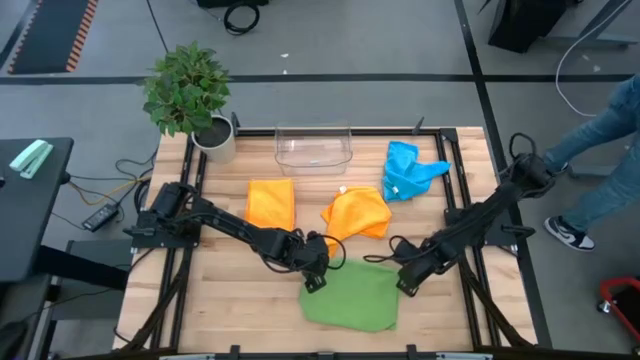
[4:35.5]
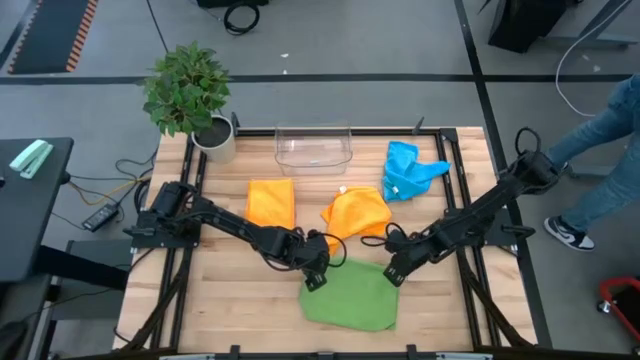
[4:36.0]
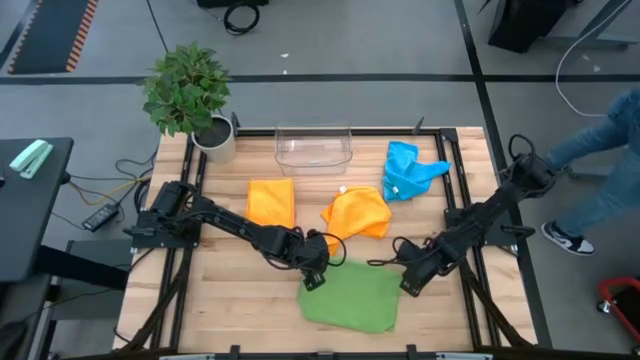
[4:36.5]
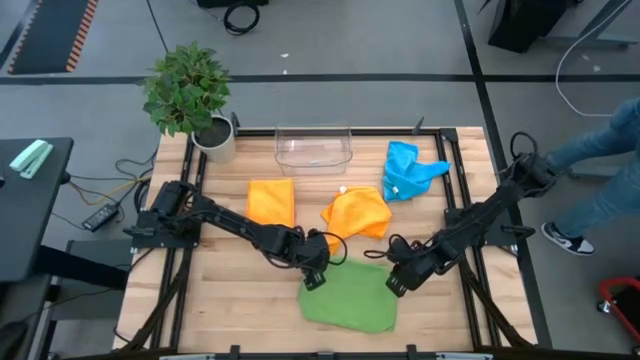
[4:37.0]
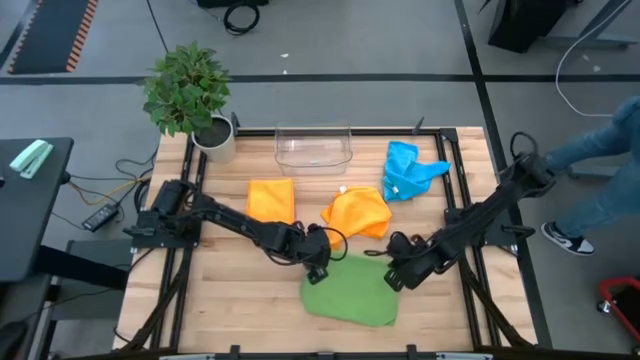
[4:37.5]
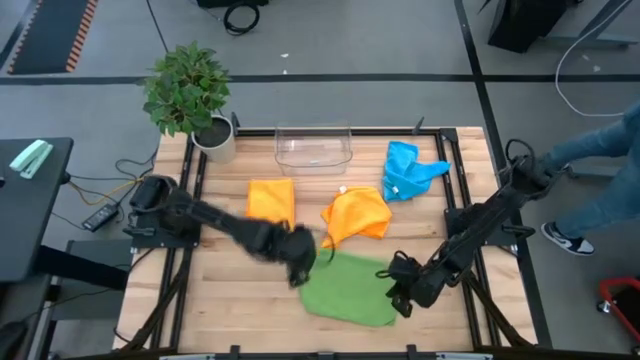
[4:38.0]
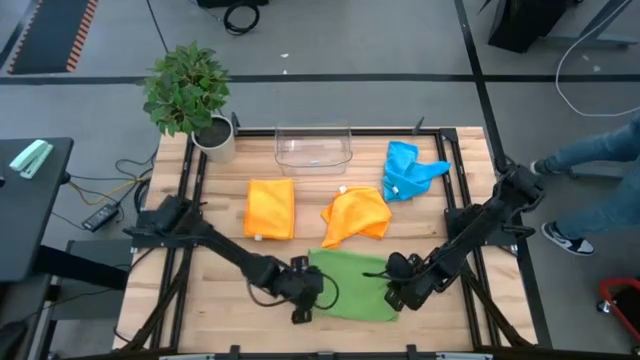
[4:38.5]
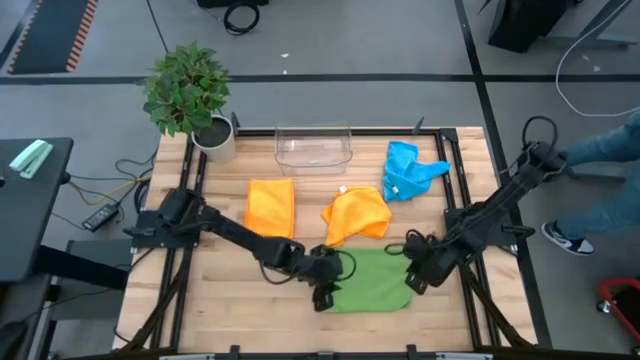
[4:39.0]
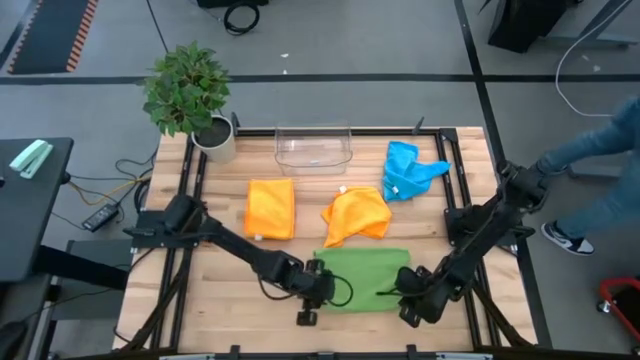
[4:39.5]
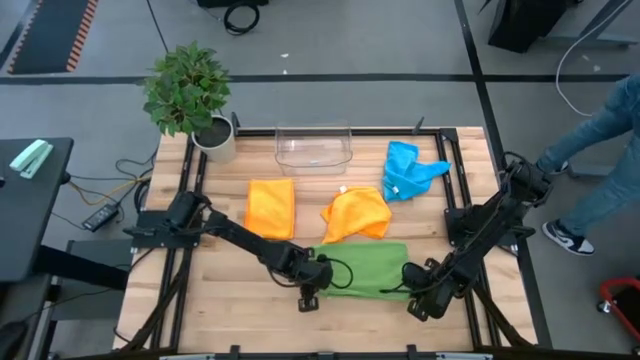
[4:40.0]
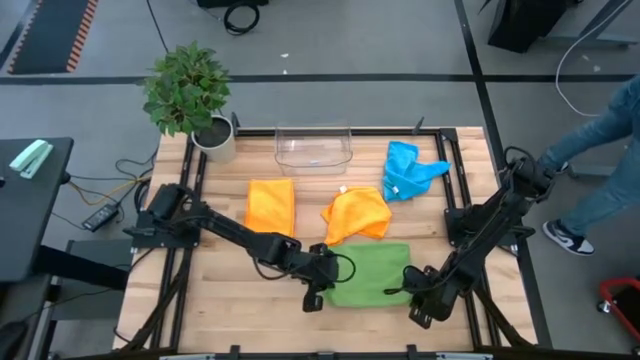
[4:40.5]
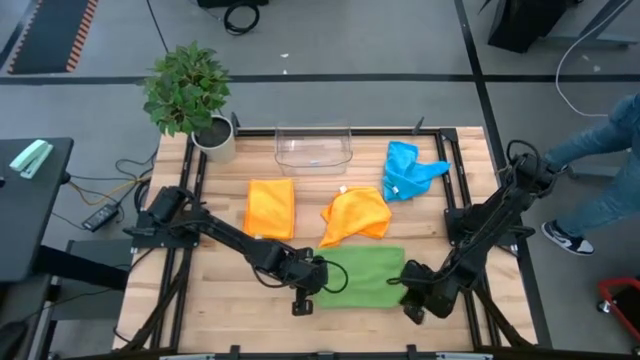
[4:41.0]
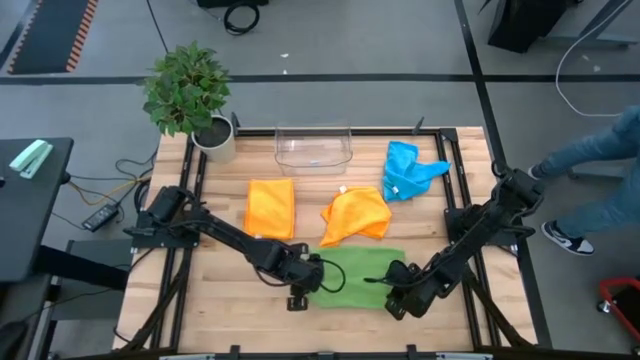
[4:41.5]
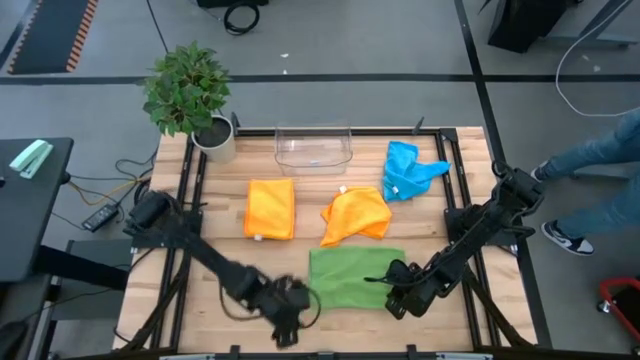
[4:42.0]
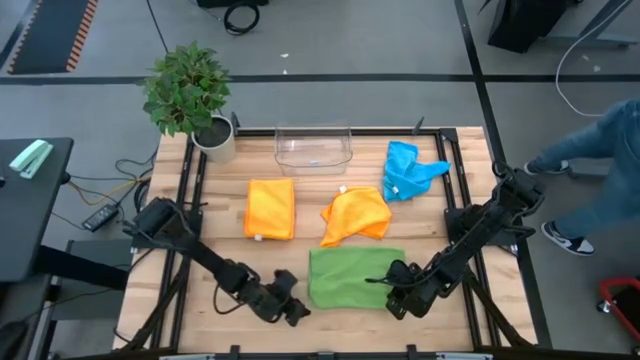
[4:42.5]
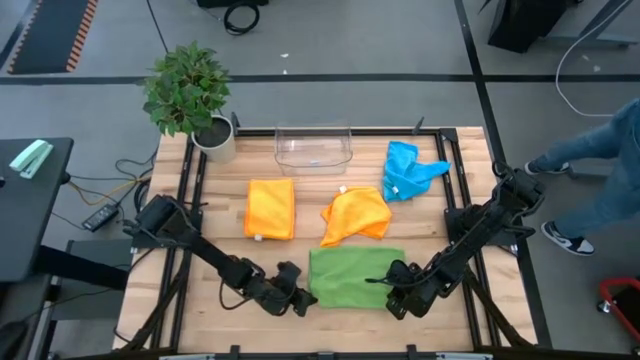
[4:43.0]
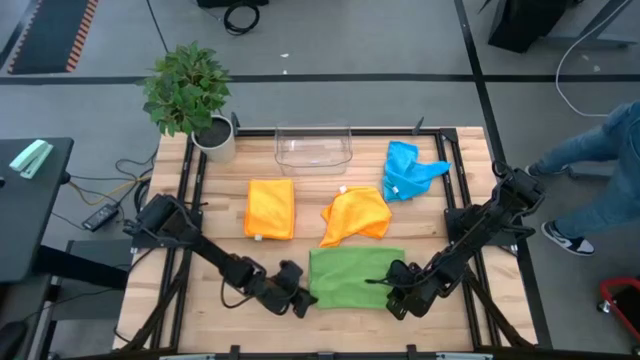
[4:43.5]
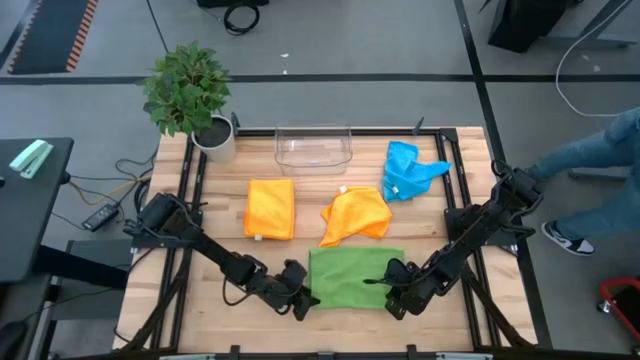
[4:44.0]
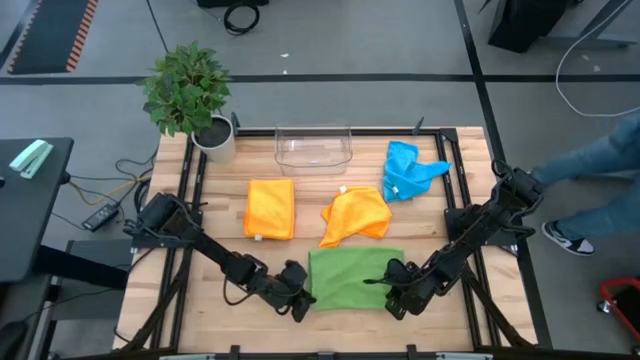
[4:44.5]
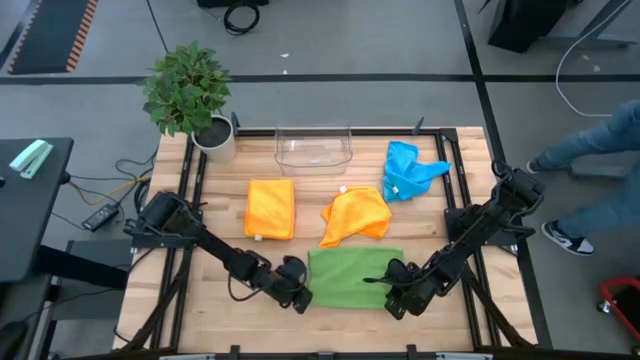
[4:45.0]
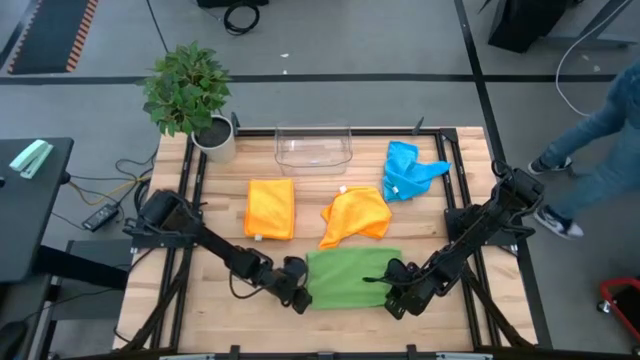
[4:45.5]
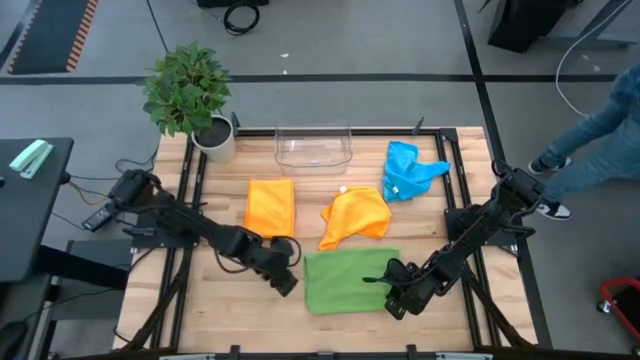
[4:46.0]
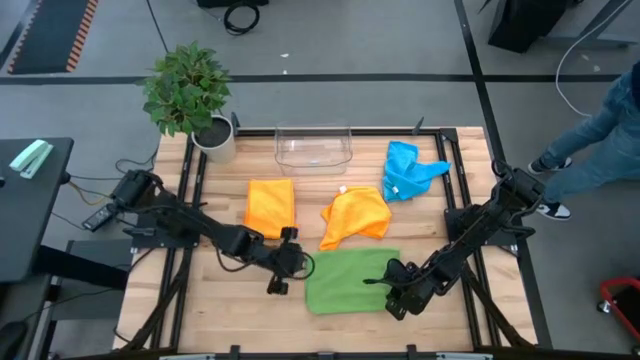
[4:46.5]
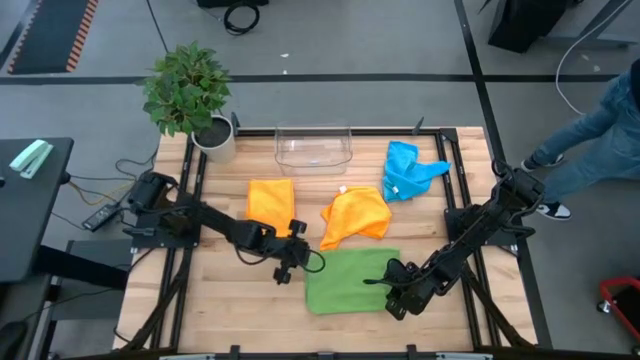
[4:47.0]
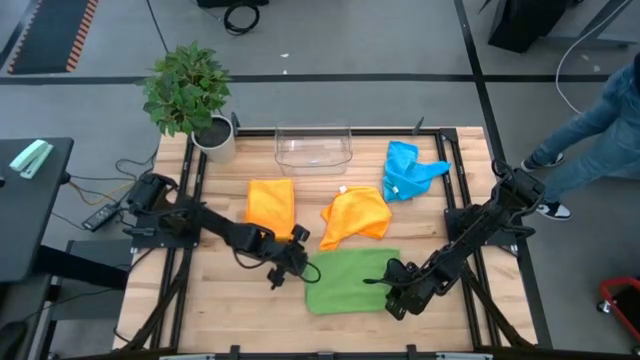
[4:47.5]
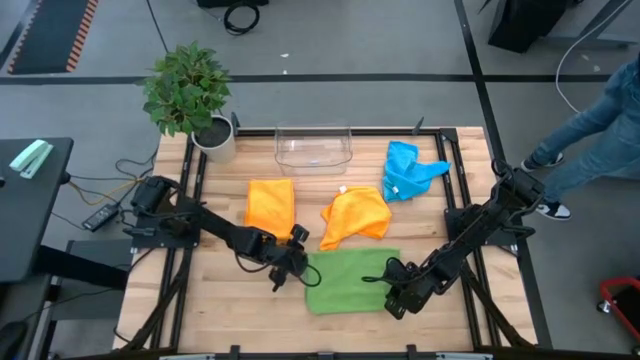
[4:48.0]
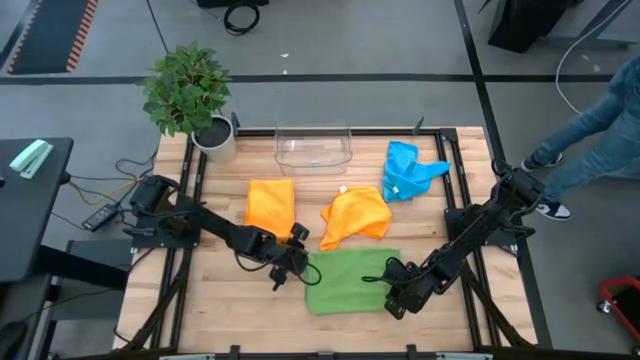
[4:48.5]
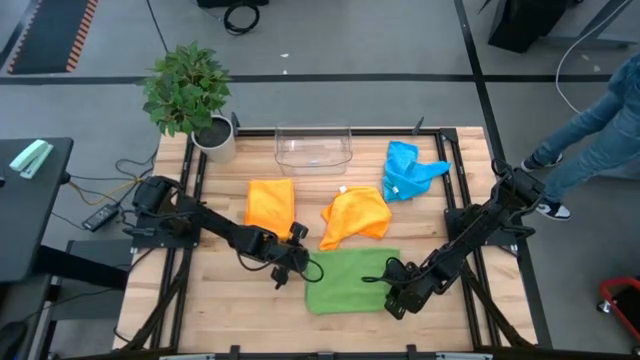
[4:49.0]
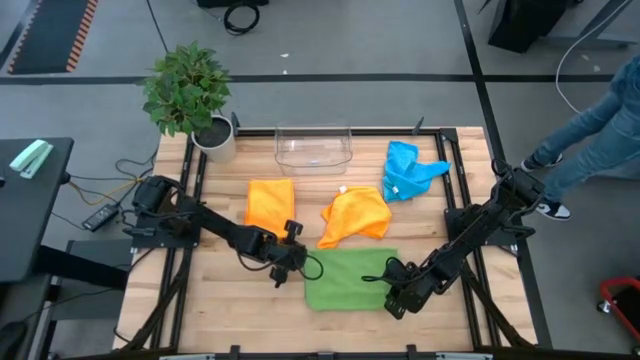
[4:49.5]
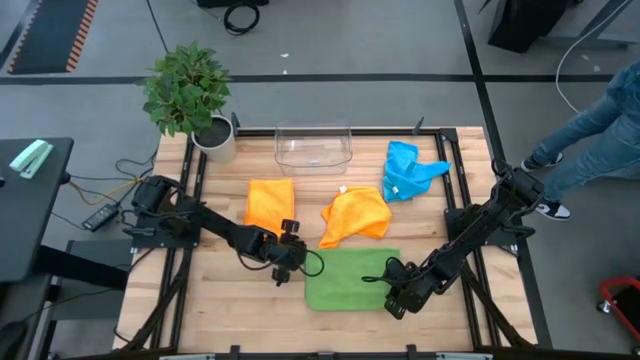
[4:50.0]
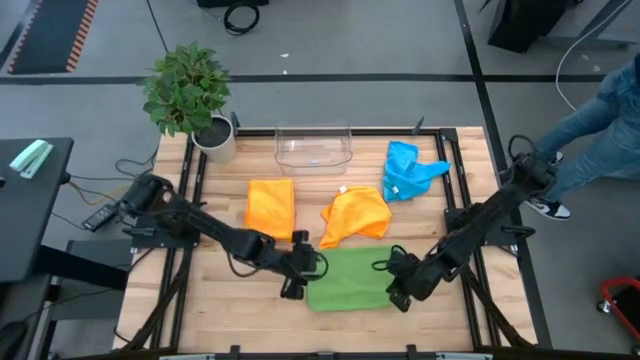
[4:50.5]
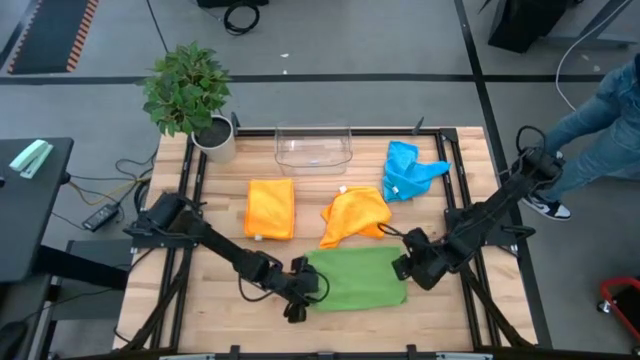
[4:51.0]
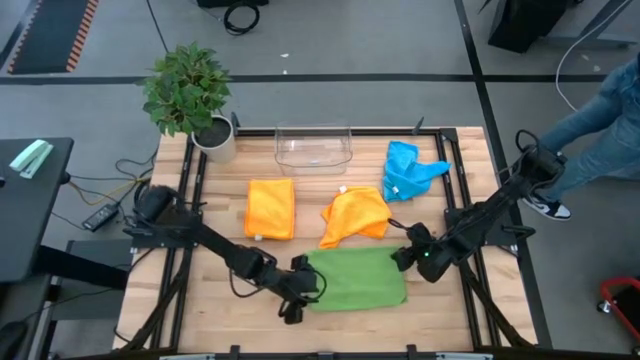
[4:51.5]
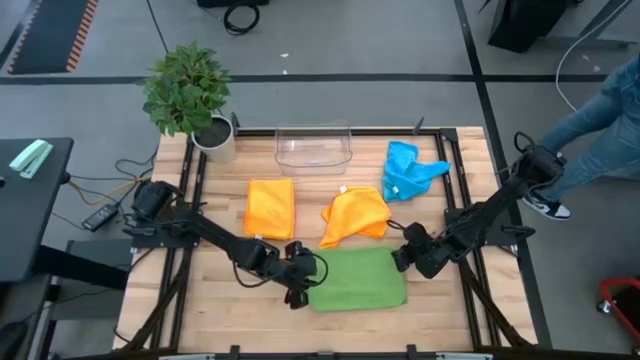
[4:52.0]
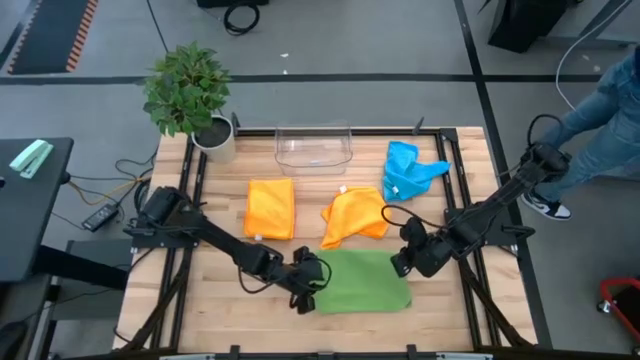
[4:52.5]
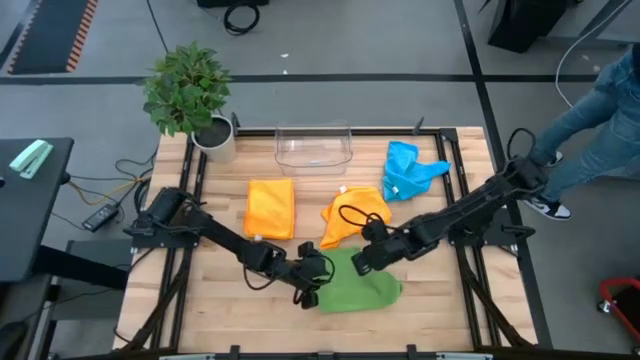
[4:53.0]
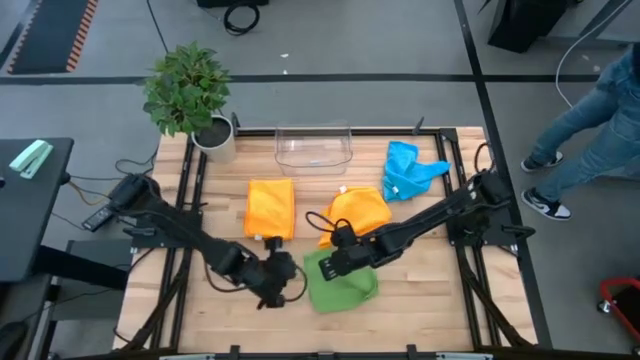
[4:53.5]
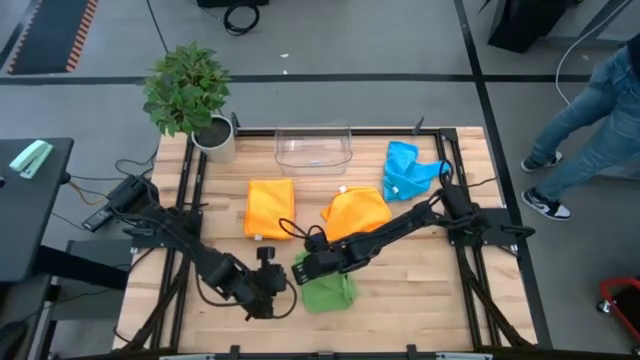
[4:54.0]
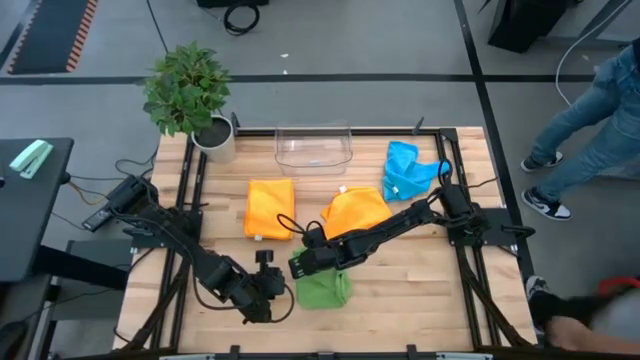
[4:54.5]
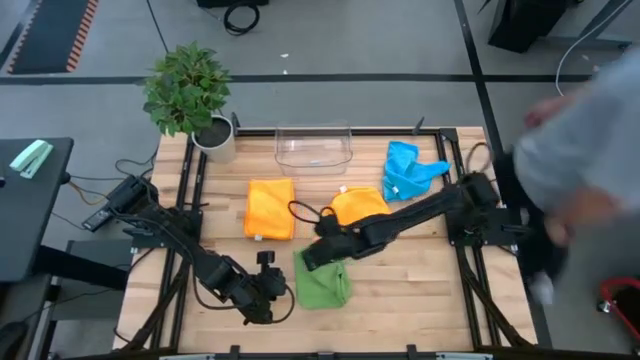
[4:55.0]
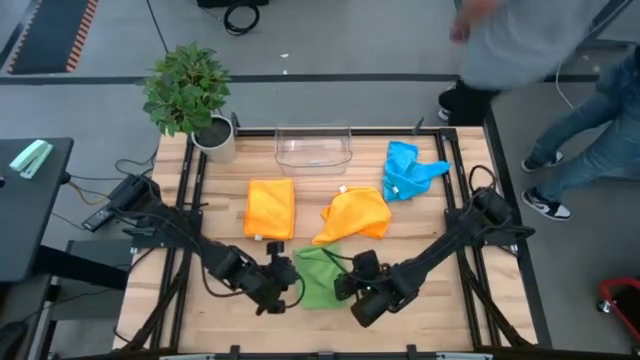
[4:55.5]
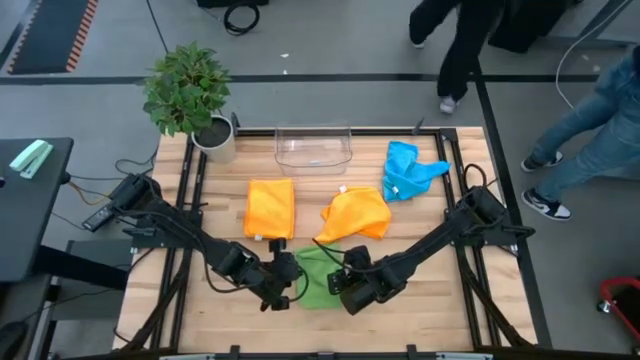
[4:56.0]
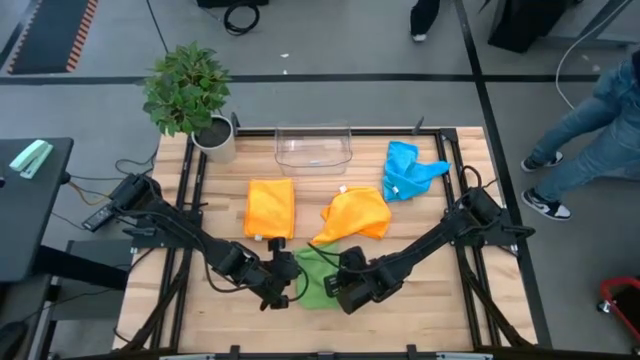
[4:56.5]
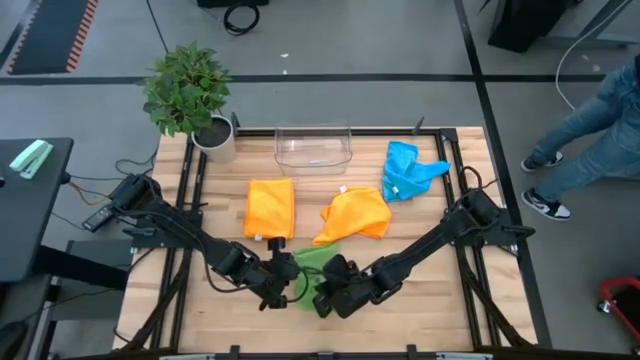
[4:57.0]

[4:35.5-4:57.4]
Task: Fold microfiber towels
Fold the green microfiber cloth
